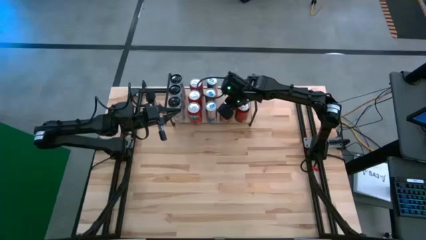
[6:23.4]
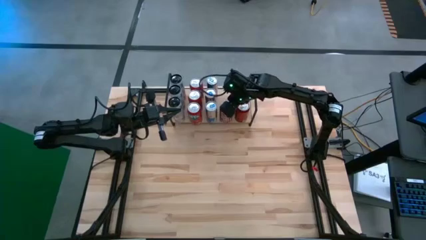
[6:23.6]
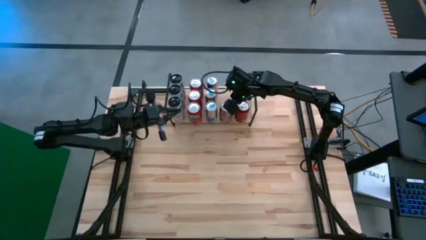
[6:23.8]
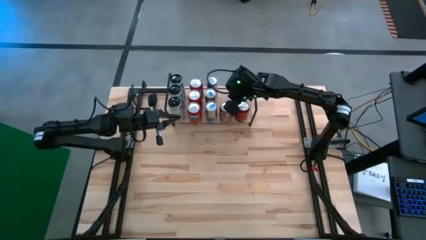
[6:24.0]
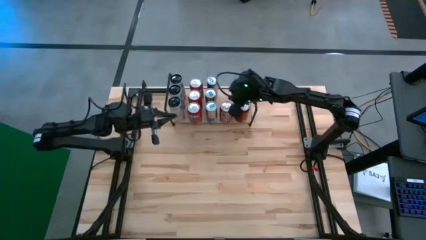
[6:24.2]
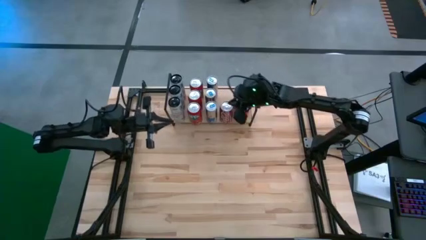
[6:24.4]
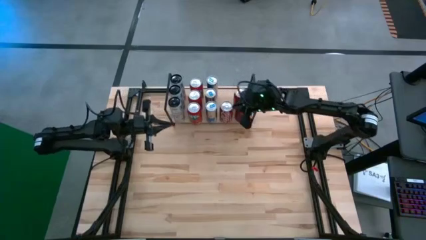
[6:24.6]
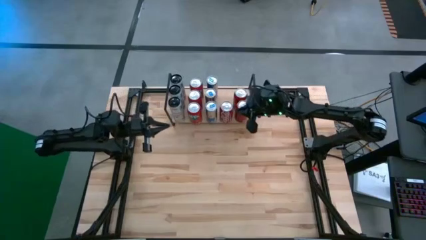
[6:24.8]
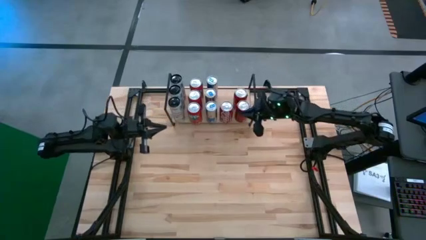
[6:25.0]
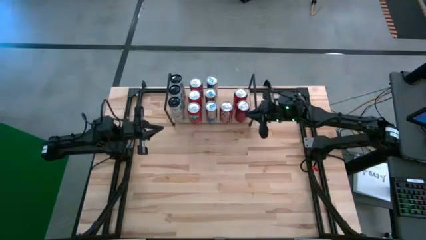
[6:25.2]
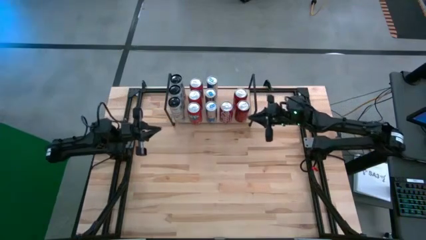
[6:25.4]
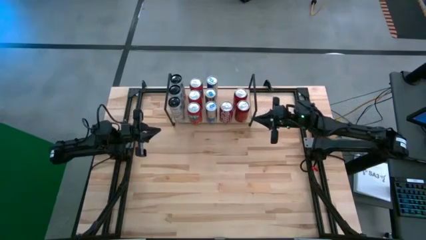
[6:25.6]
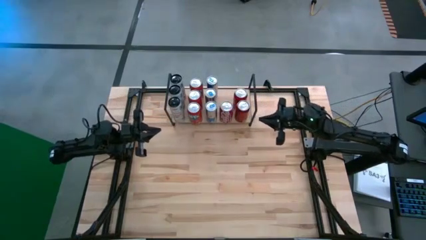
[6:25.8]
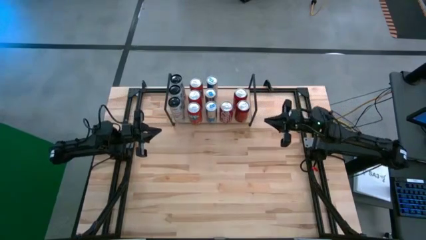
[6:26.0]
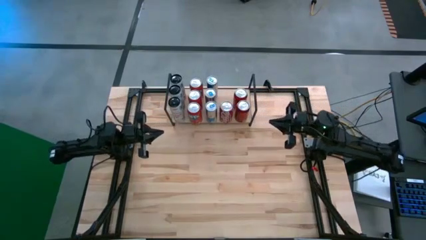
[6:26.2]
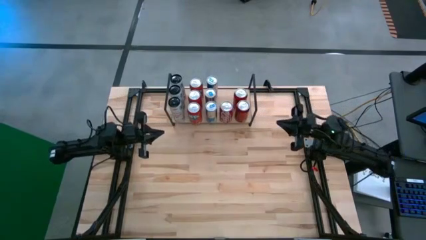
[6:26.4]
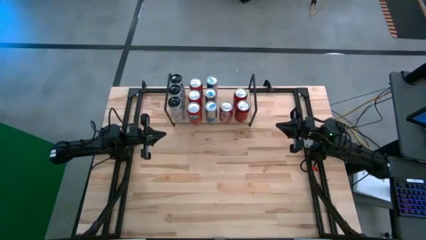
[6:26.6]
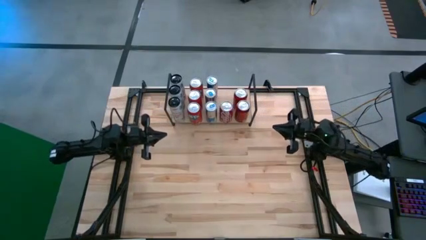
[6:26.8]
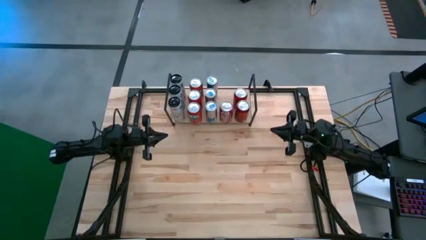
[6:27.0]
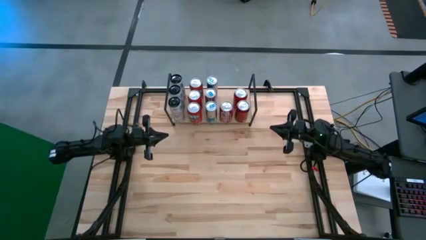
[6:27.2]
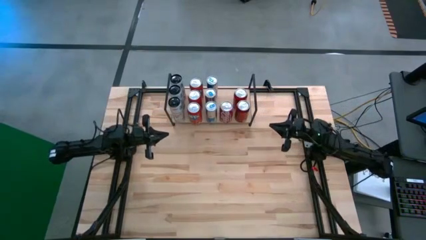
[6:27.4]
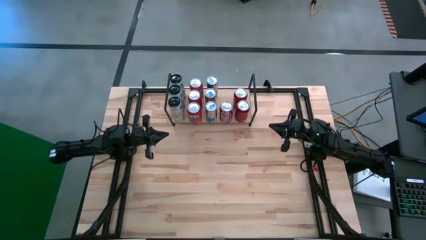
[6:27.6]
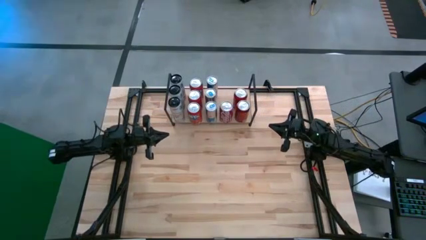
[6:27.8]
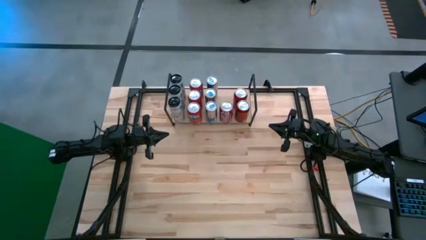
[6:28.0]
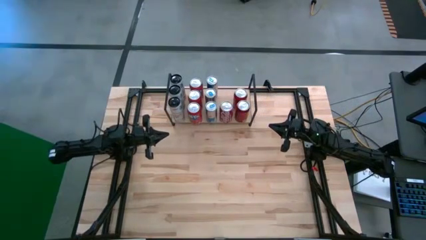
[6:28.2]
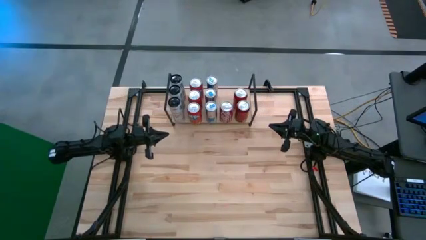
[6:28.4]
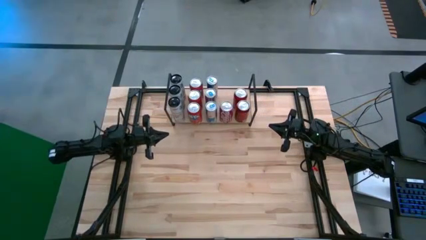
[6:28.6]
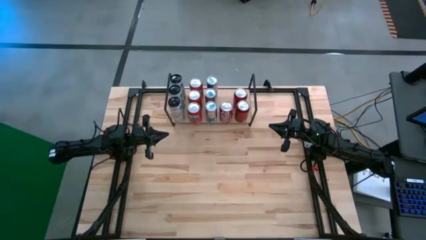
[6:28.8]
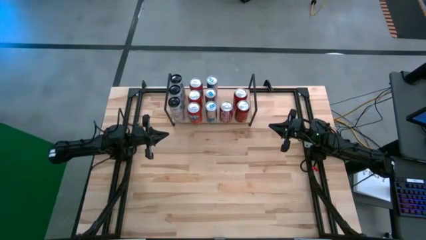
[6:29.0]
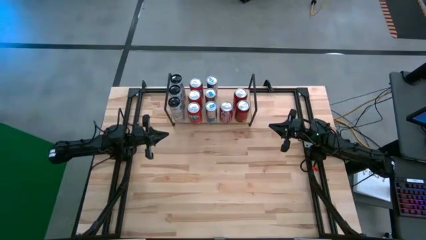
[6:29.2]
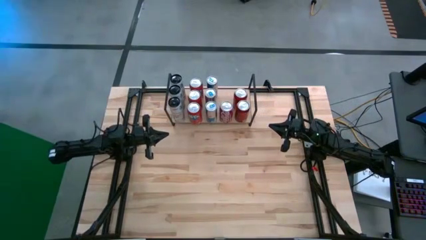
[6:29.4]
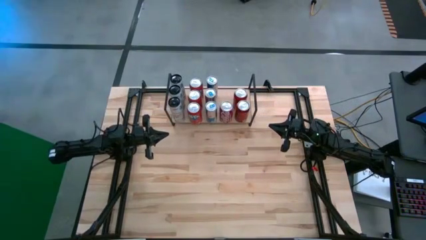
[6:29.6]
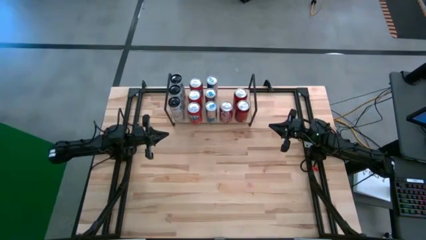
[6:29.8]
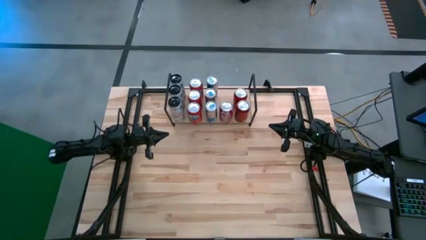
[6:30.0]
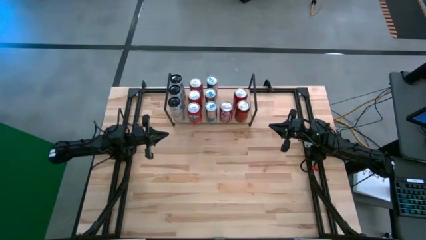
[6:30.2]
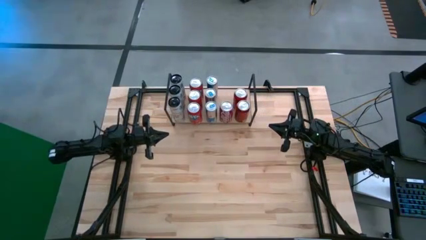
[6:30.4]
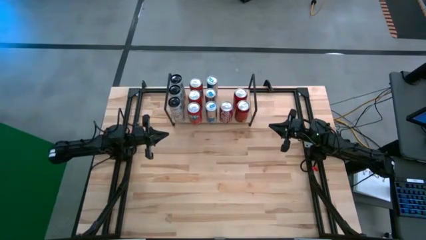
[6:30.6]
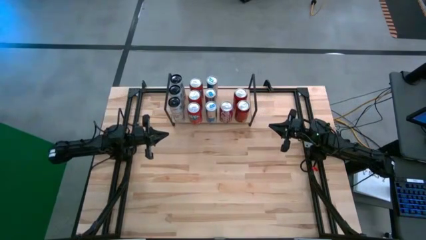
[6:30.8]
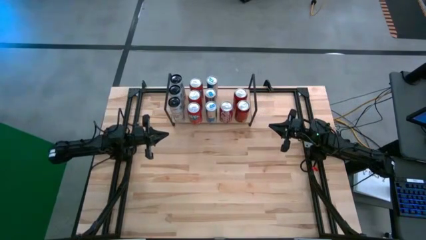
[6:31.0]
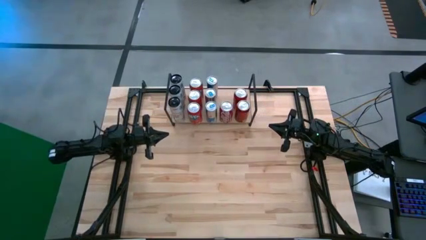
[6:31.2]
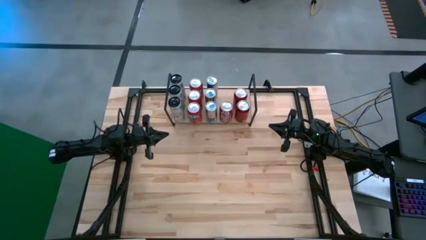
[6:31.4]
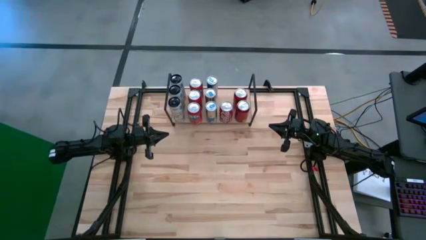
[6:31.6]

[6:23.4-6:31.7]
Task: Place canned beverage on shelf
Return to Home Position

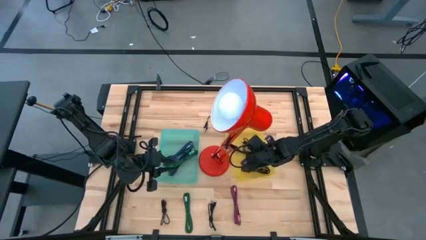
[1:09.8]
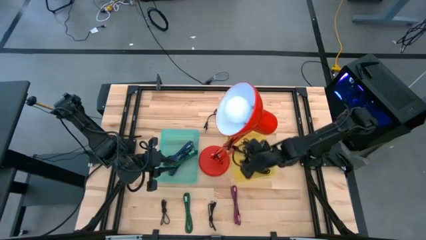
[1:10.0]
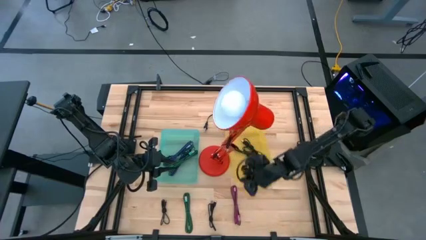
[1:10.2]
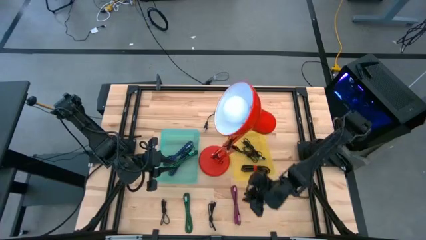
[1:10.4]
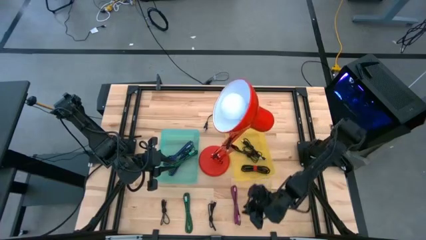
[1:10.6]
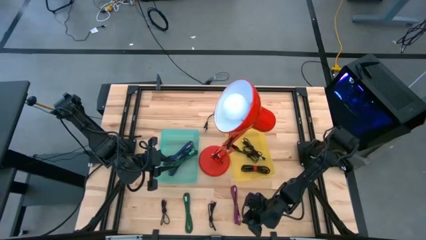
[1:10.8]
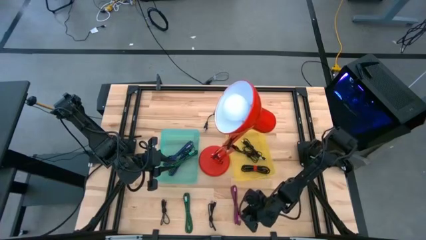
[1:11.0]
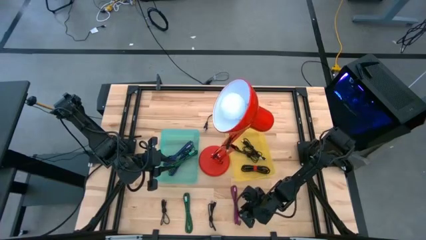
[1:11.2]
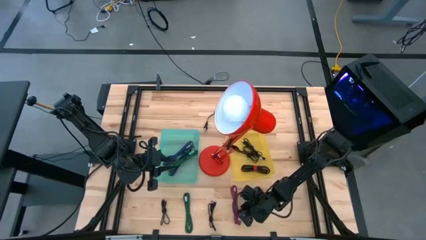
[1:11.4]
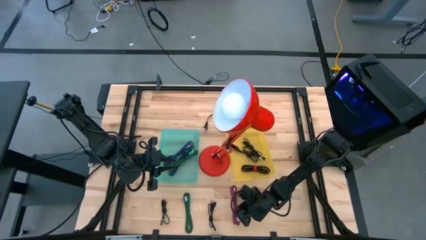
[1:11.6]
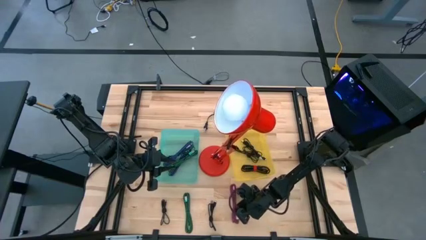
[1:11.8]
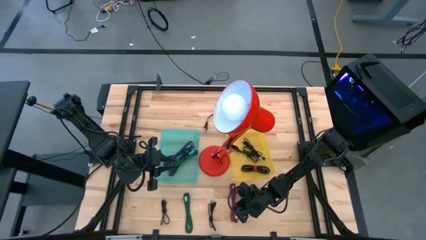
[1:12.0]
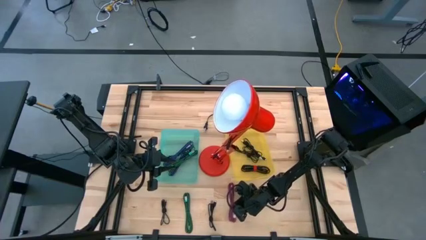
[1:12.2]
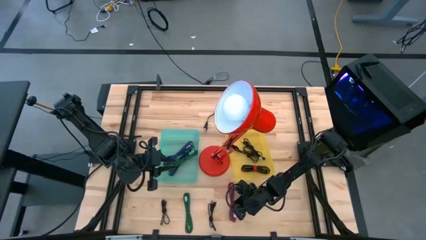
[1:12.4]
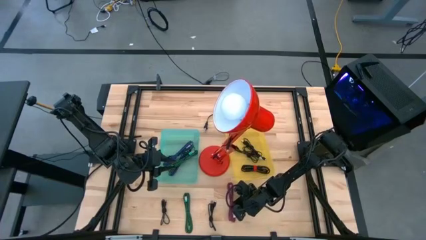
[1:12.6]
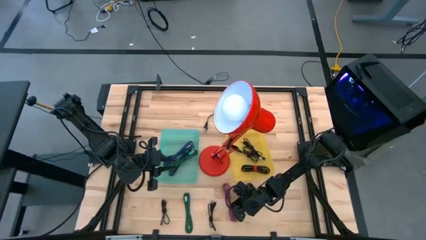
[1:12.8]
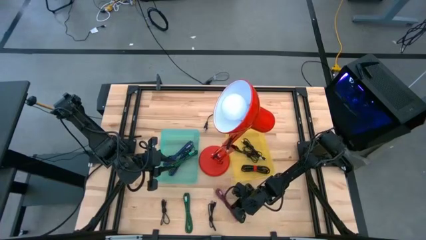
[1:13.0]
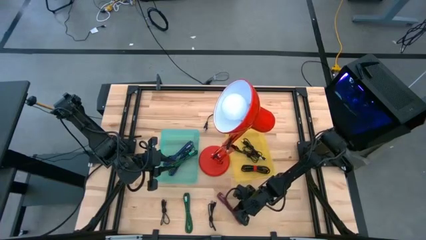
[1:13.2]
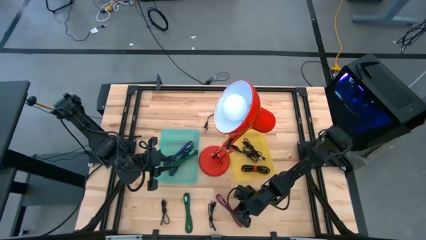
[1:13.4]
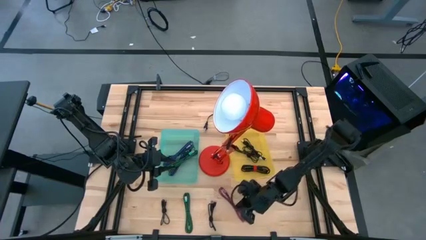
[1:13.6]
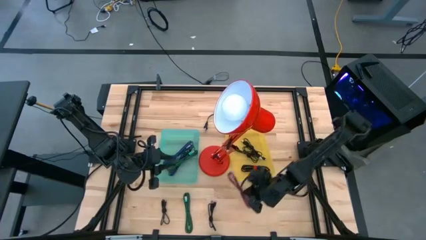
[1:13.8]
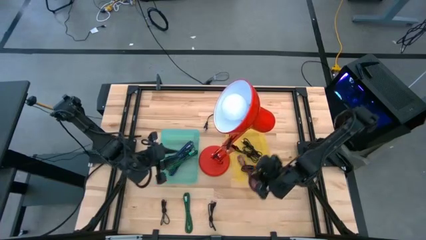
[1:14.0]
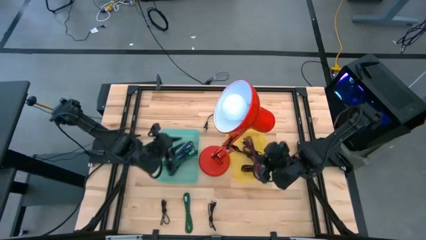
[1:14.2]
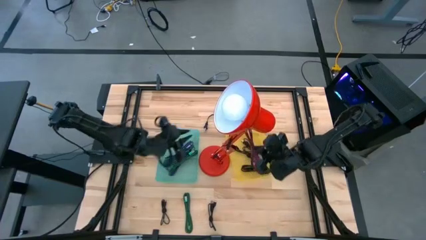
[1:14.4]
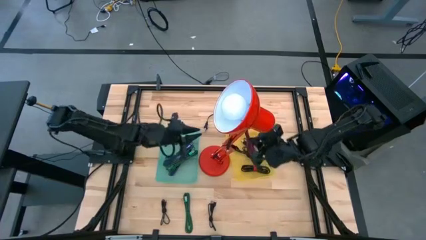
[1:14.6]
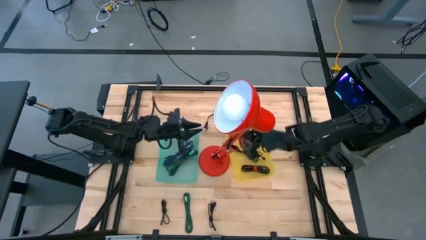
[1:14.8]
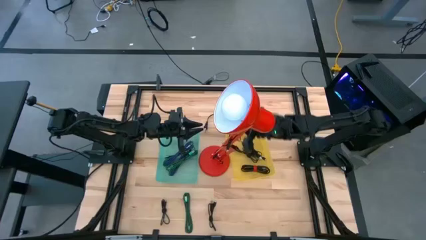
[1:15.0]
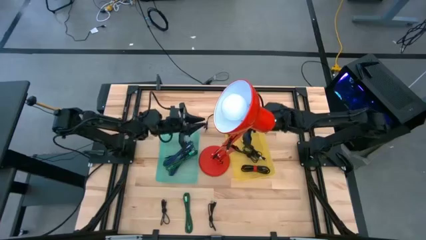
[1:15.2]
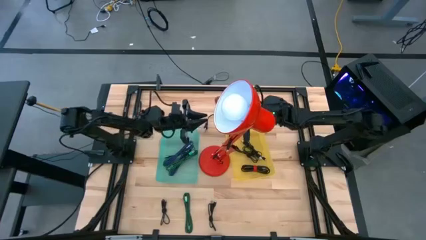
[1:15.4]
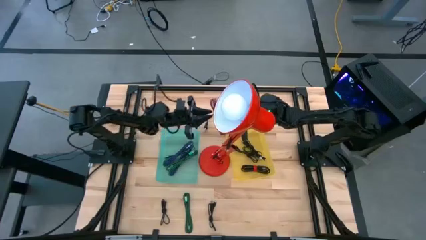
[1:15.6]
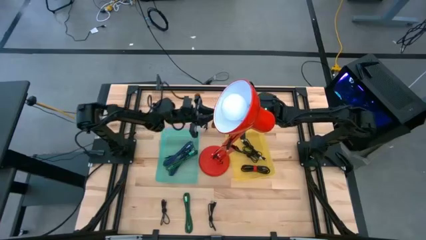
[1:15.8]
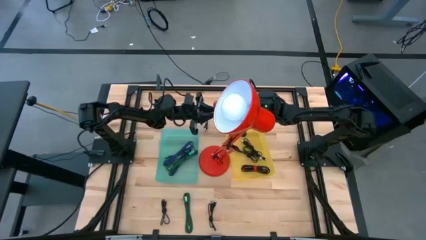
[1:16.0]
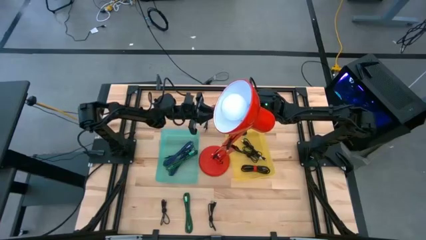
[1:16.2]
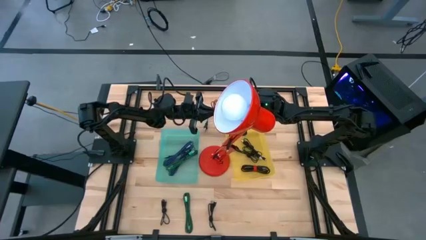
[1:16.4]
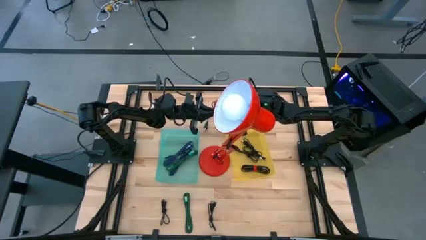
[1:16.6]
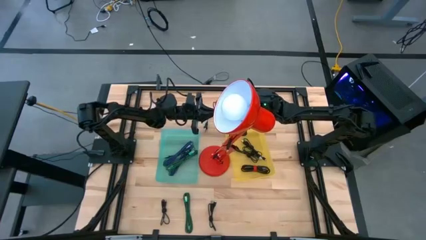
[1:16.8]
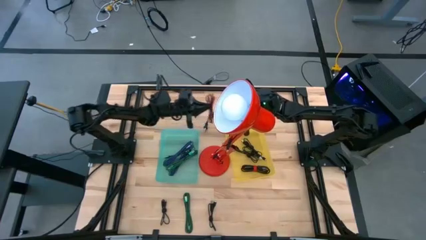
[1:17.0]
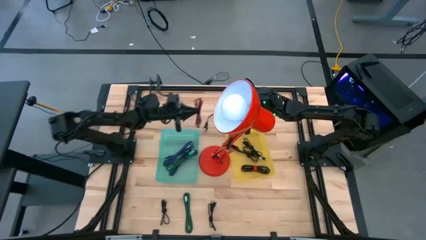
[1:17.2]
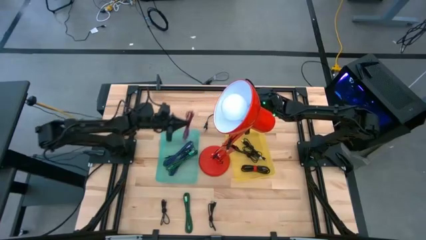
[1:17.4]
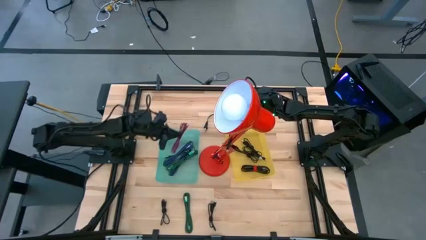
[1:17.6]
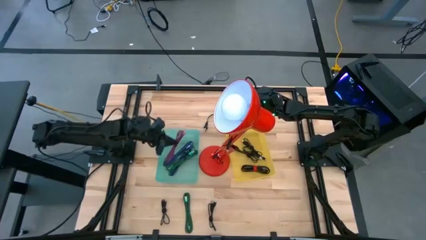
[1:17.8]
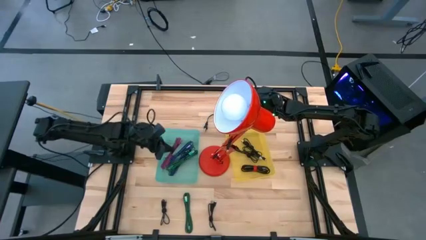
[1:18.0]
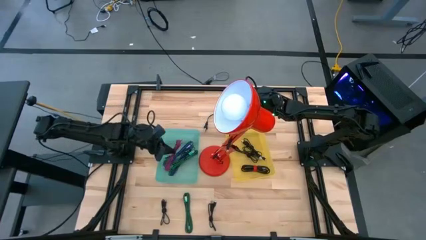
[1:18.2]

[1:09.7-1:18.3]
Task: Pick & Place USB Port
Put the pink patterned charger cable into the blue bin
